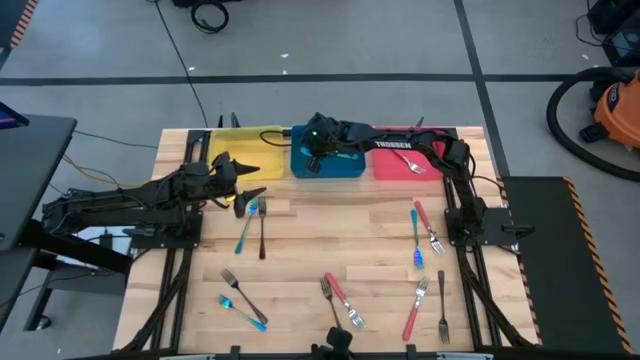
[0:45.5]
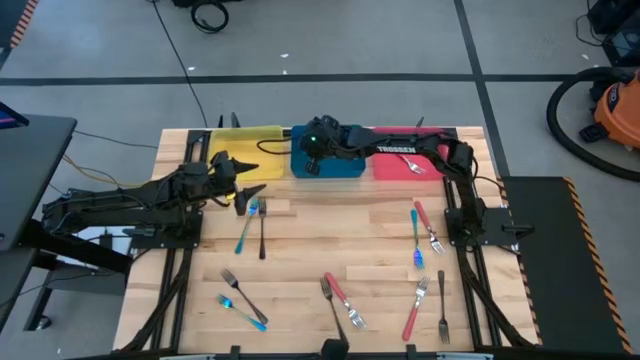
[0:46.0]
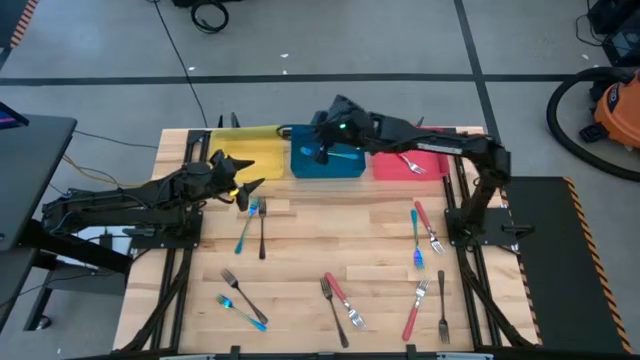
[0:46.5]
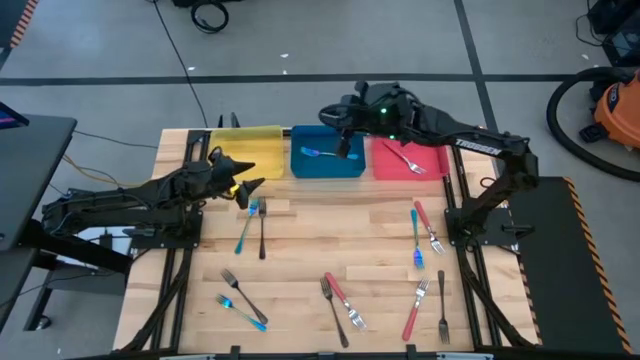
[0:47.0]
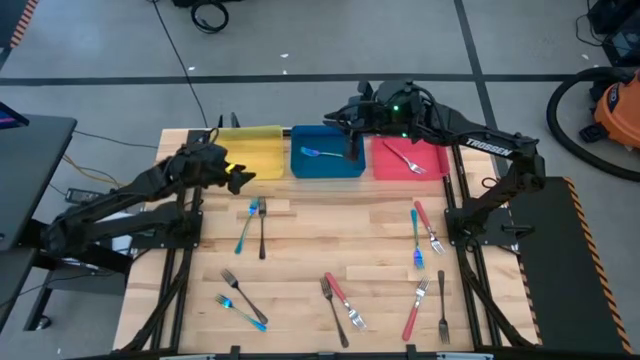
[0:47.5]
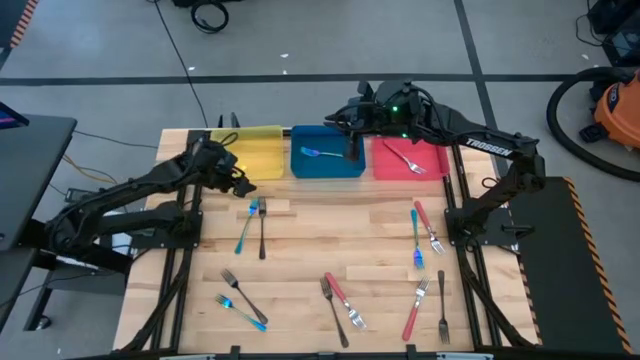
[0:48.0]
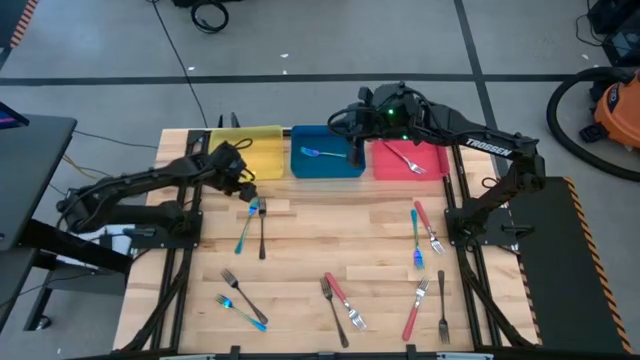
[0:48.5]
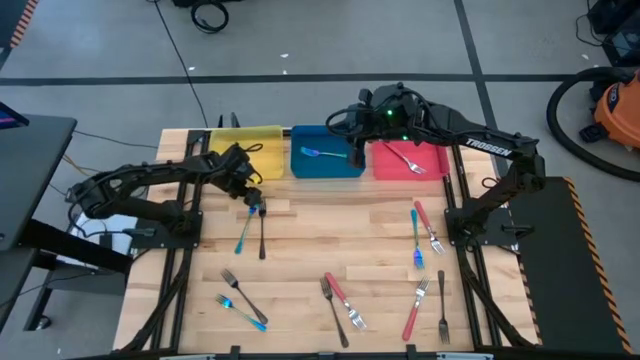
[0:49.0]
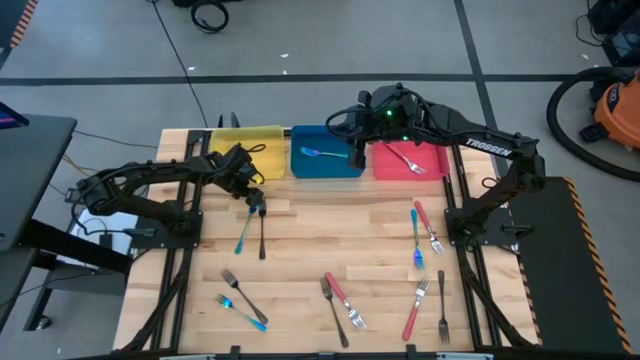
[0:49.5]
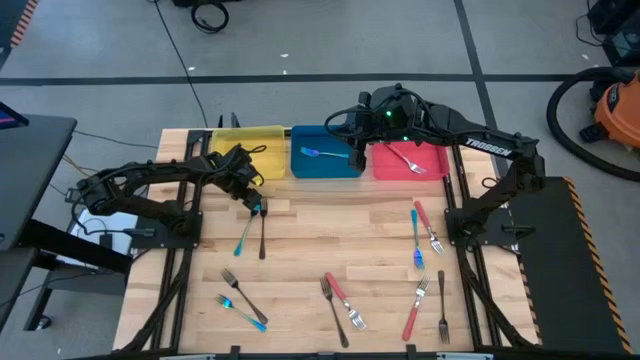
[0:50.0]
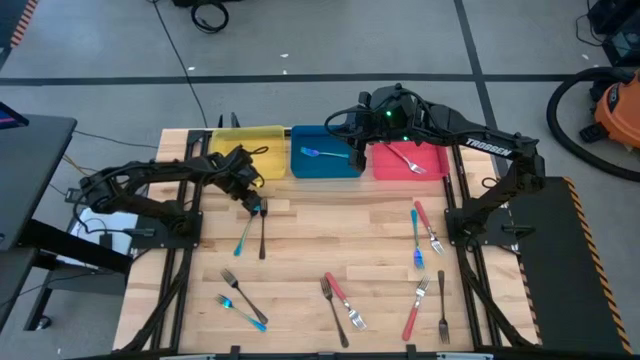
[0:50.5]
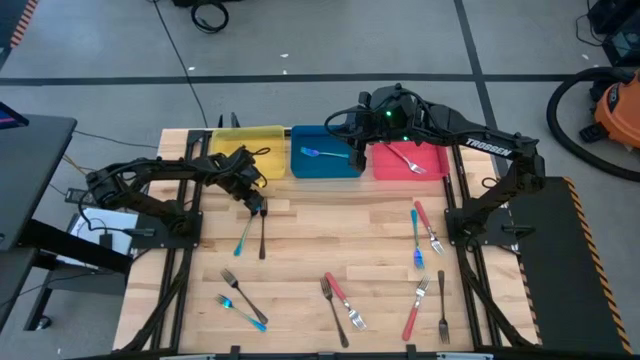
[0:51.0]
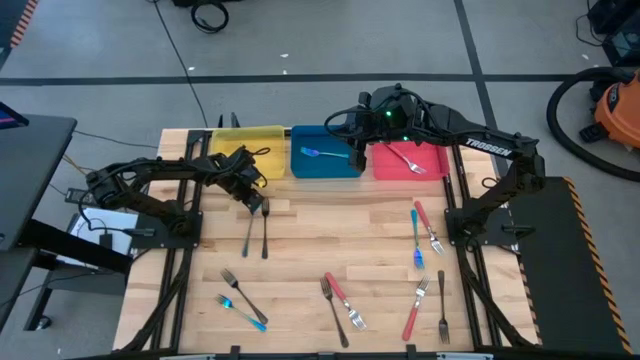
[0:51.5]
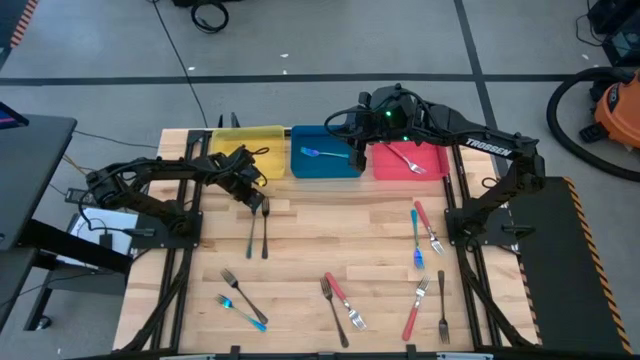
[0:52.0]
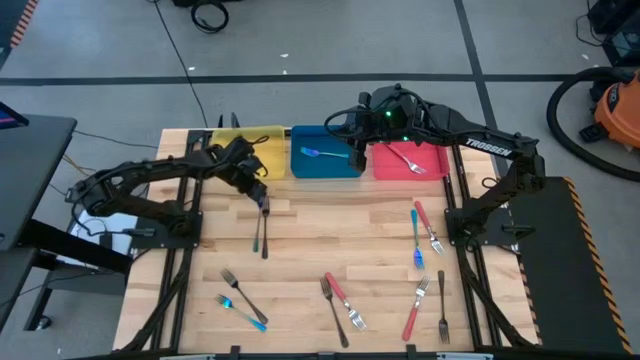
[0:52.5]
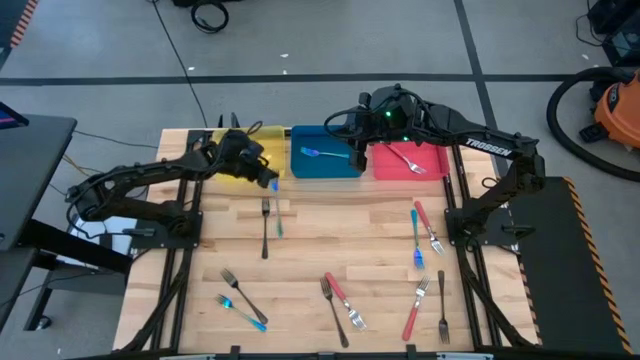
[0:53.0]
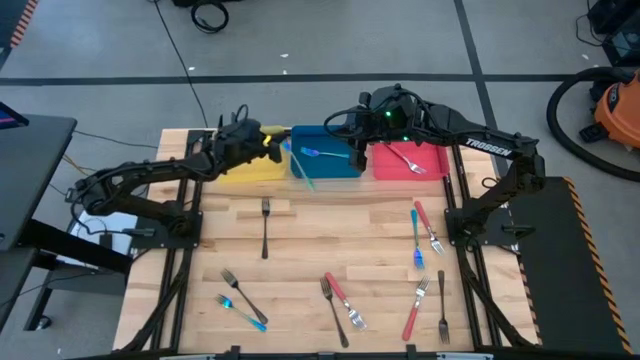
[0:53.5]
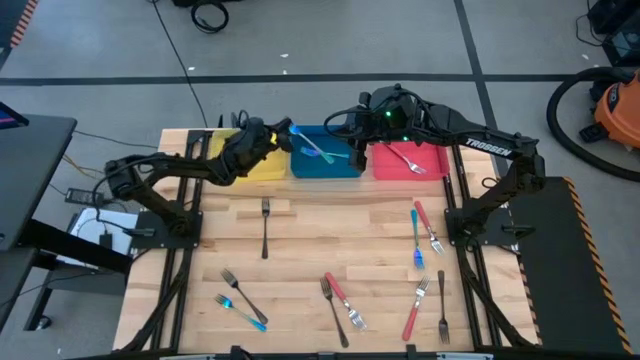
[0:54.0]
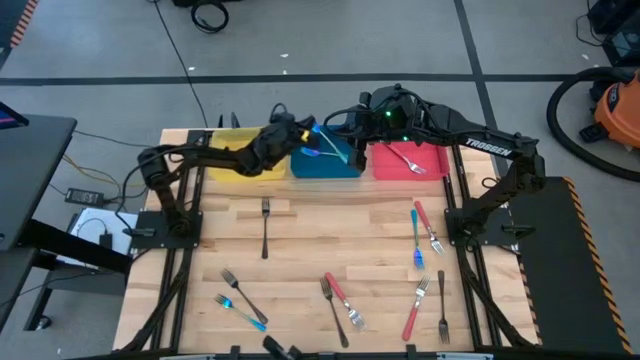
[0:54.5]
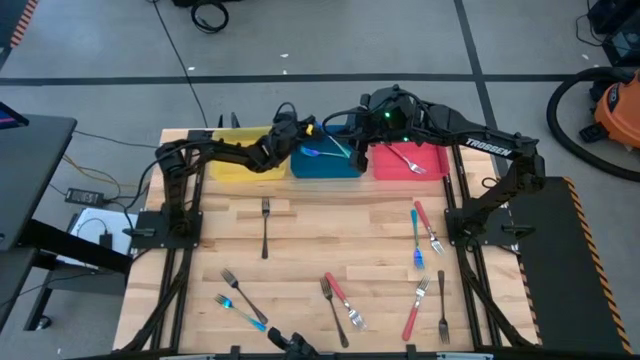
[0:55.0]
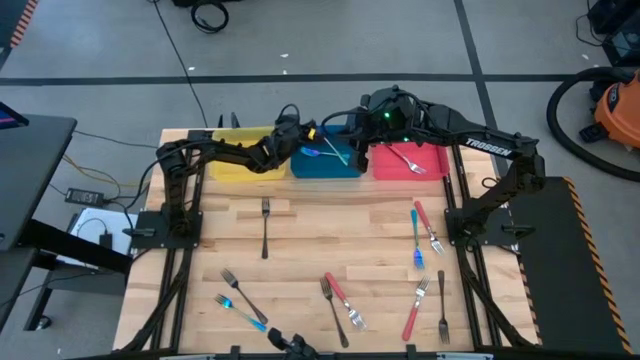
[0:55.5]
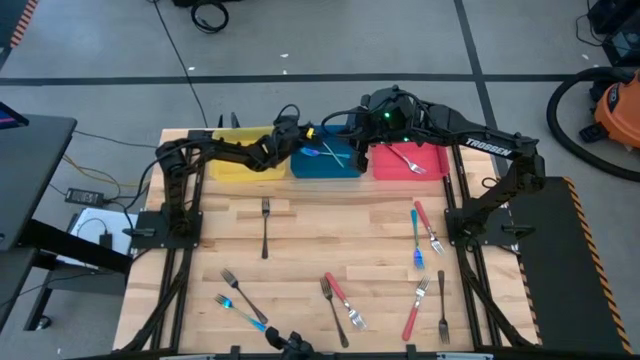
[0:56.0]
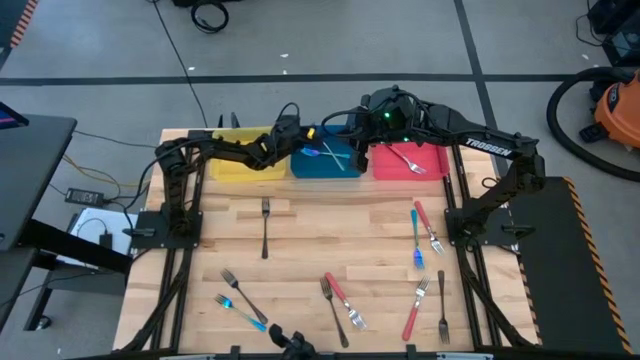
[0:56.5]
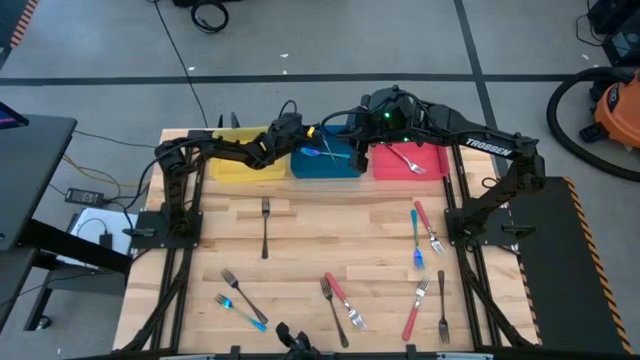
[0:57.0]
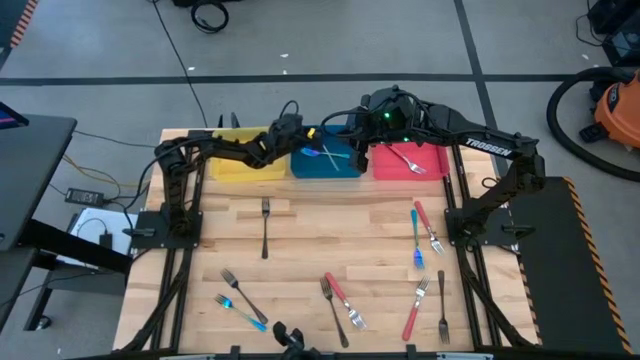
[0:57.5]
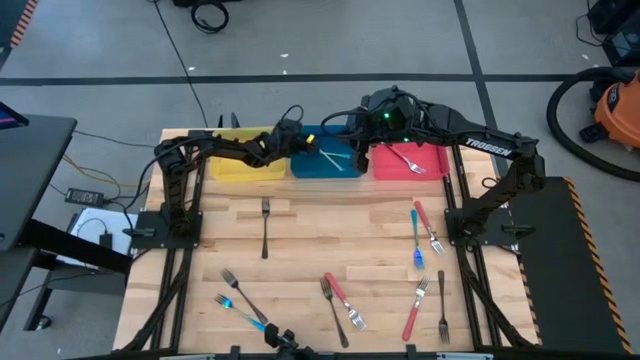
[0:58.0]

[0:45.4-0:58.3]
Task: Sort silverware by color (type)
Put the top left blue fork into the blue bin

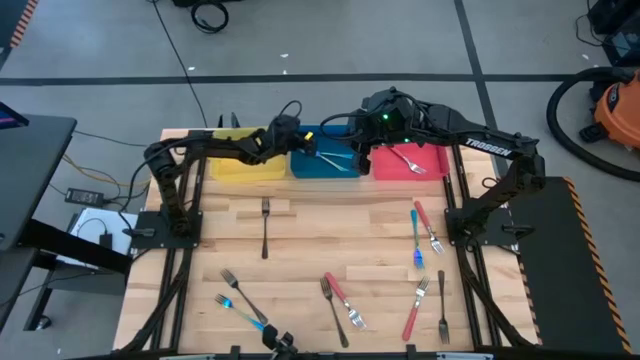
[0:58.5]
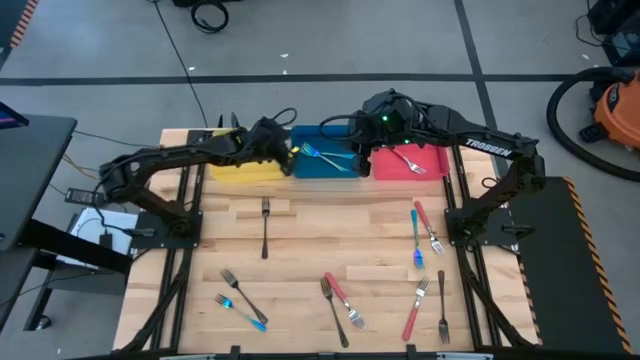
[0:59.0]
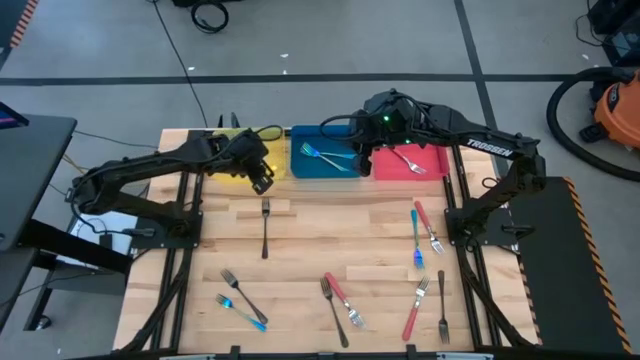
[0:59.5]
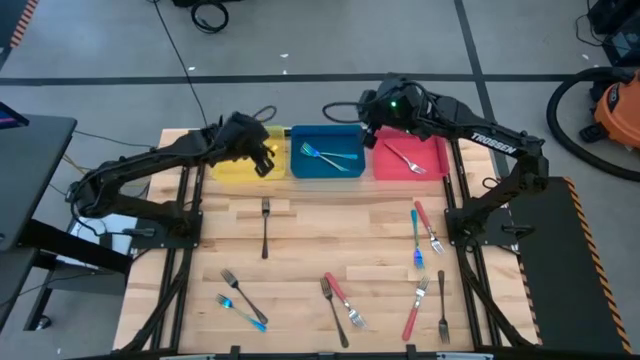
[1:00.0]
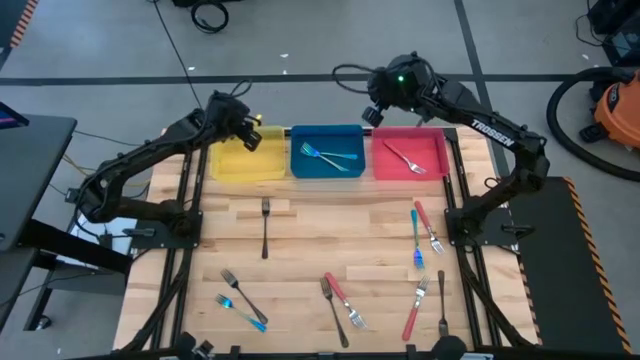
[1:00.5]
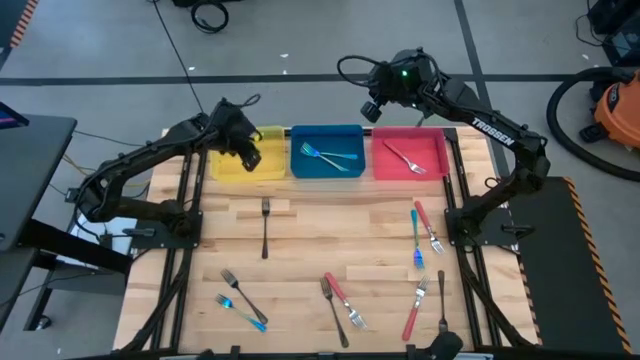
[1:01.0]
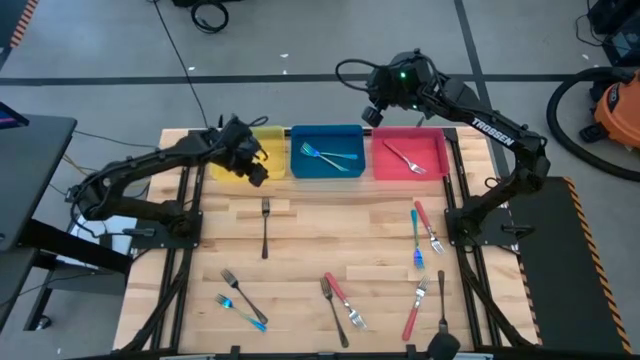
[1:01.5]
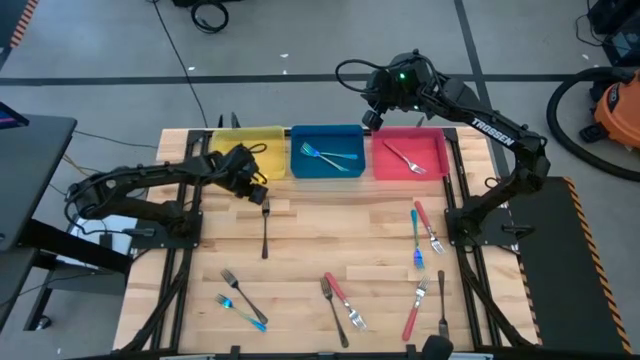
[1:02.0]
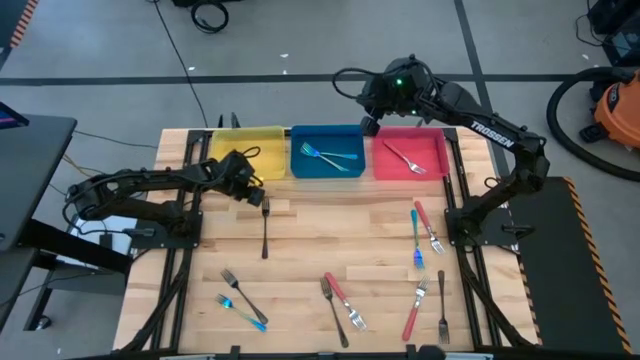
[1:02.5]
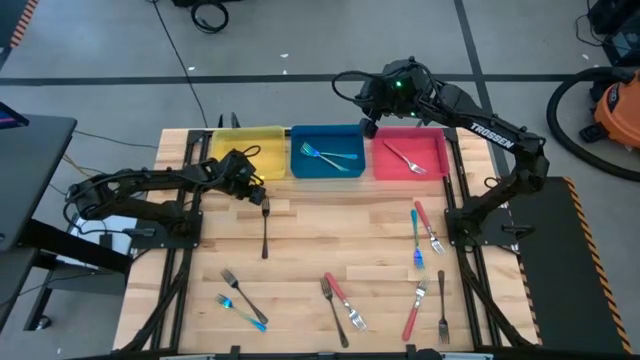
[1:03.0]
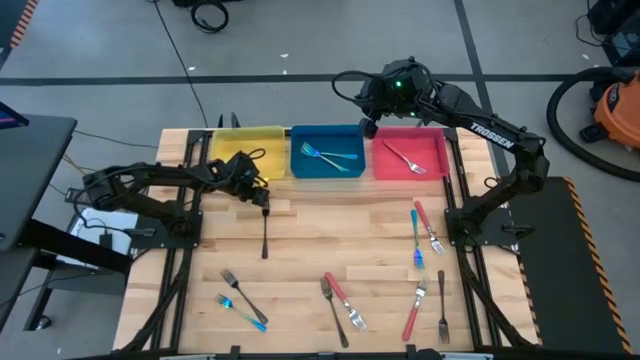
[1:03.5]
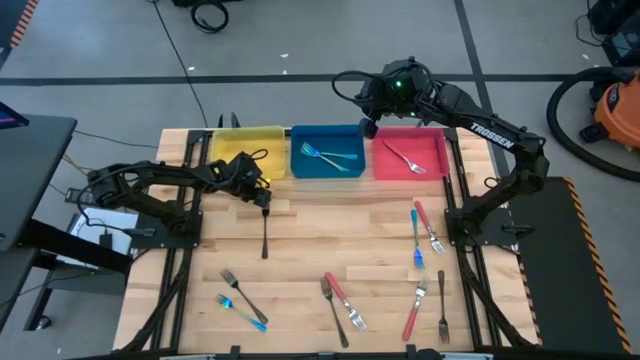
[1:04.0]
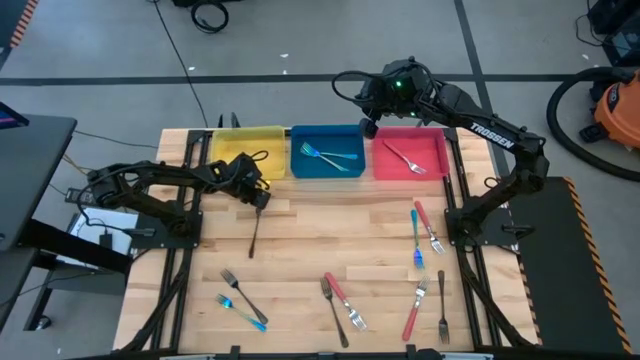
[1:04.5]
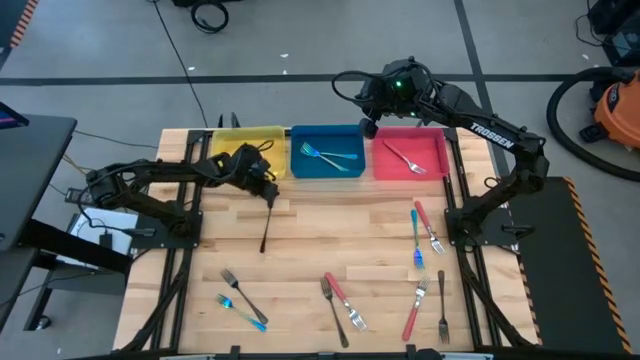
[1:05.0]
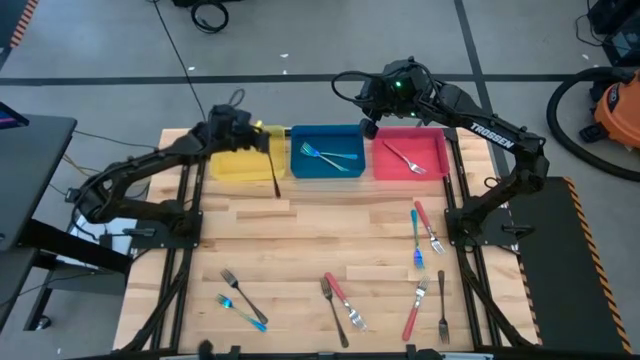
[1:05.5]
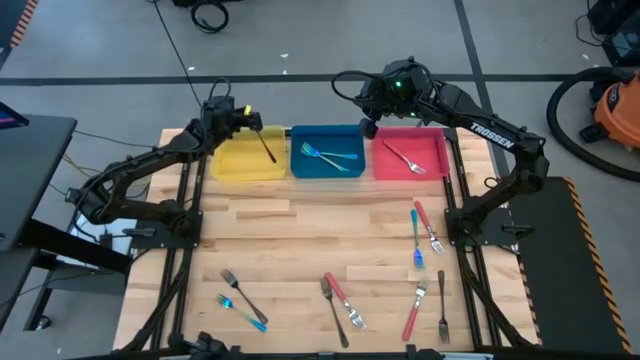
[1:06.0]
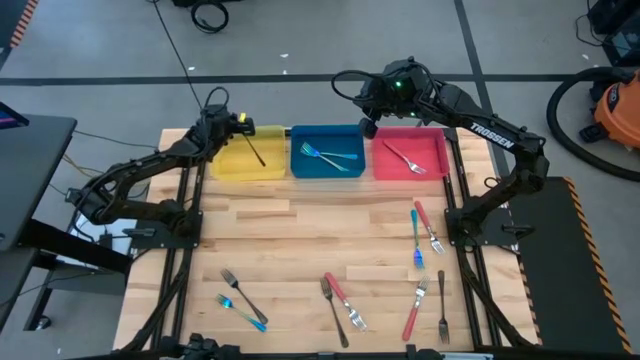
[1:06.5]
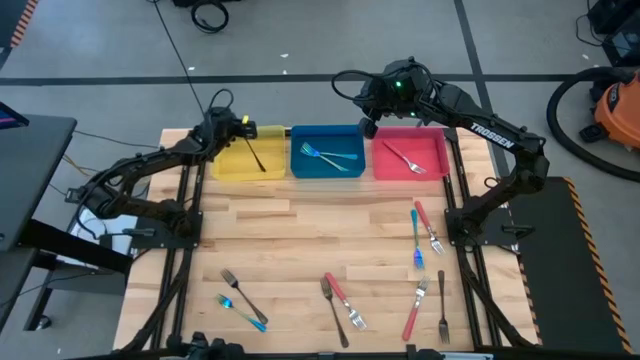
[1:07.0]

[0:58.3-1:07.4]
Put the top black fork into the yellow bin
